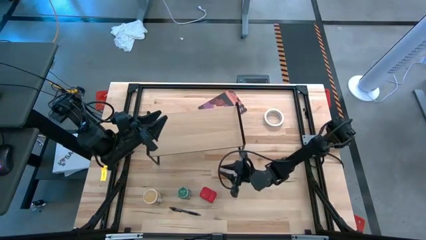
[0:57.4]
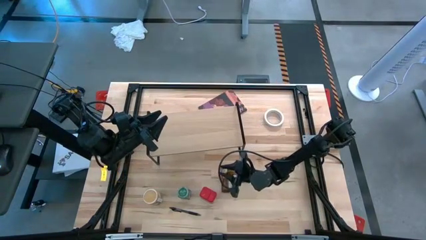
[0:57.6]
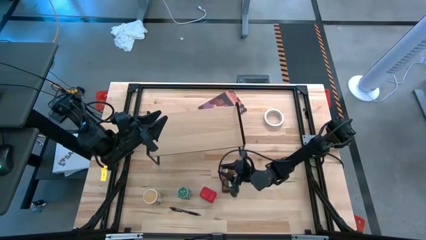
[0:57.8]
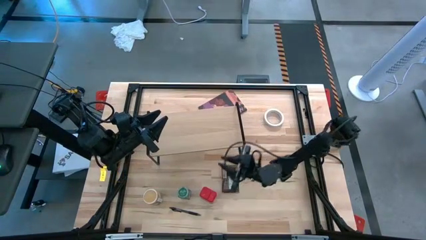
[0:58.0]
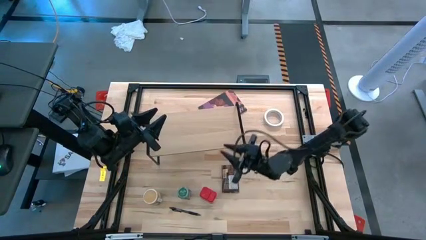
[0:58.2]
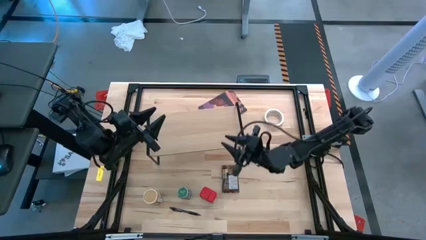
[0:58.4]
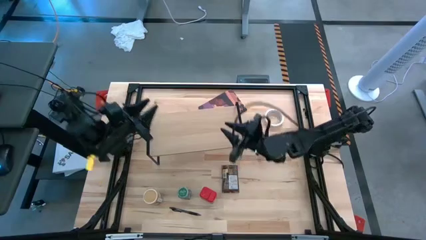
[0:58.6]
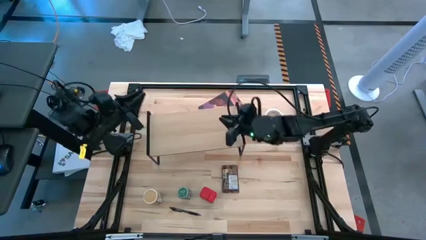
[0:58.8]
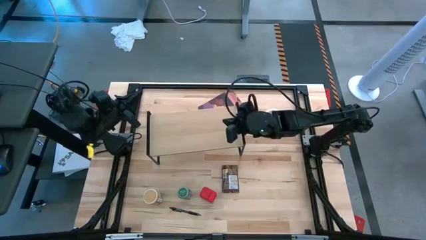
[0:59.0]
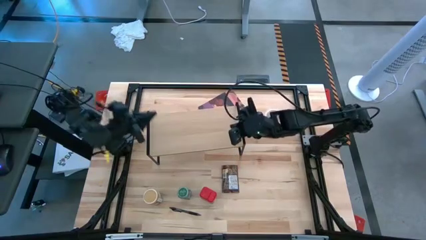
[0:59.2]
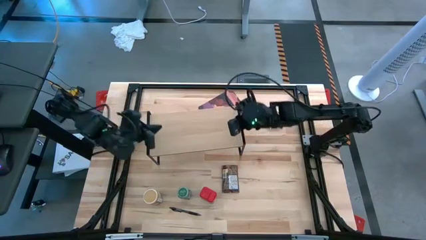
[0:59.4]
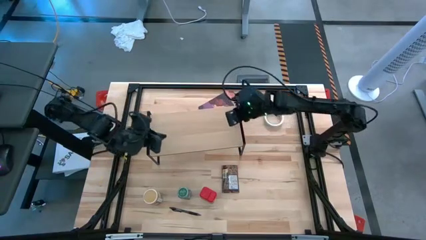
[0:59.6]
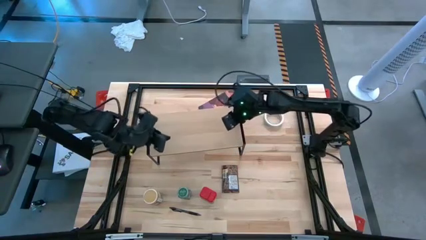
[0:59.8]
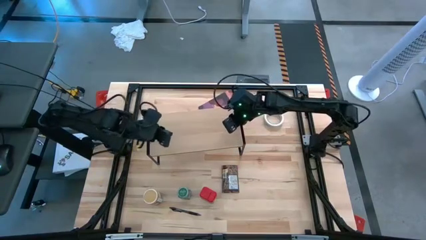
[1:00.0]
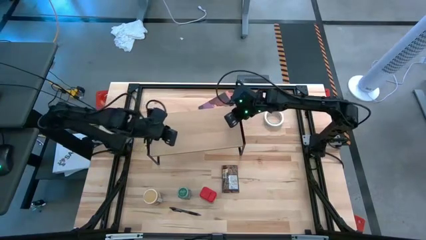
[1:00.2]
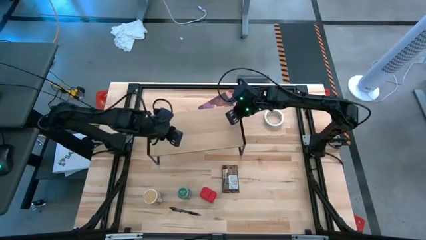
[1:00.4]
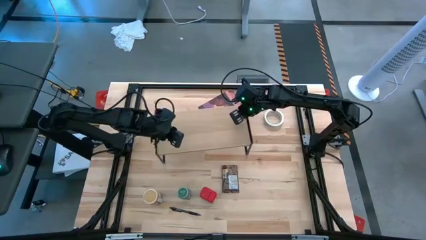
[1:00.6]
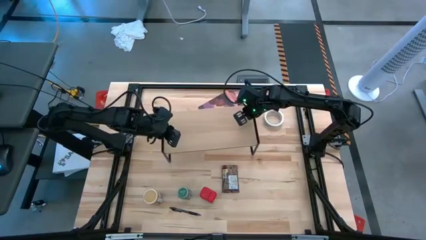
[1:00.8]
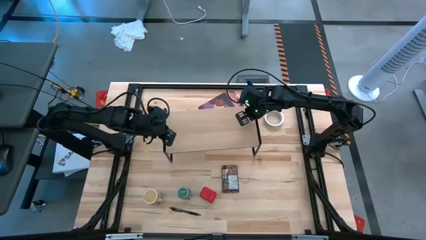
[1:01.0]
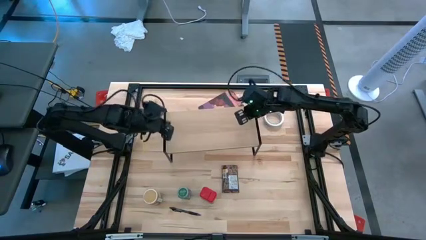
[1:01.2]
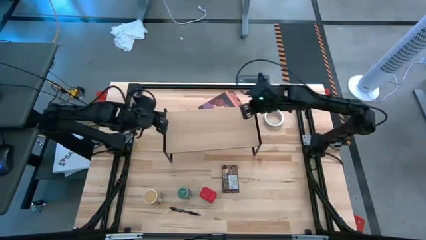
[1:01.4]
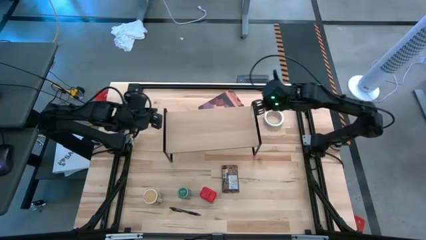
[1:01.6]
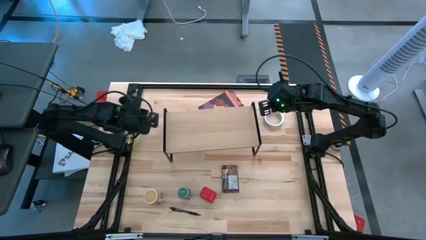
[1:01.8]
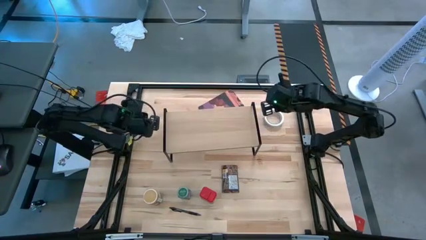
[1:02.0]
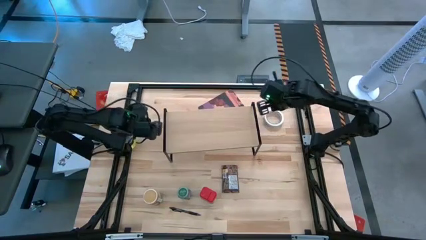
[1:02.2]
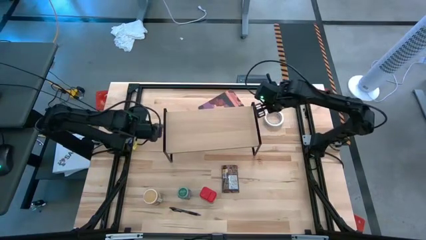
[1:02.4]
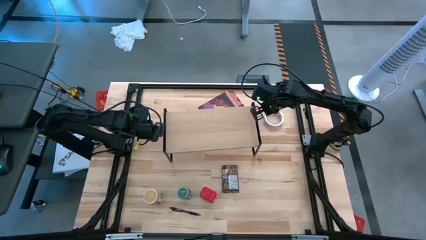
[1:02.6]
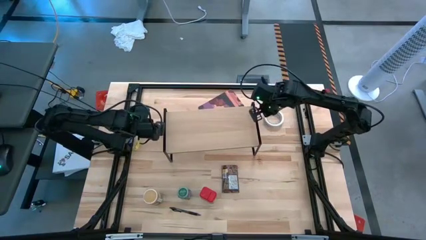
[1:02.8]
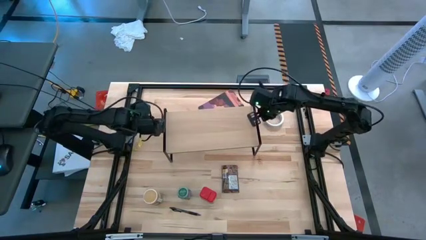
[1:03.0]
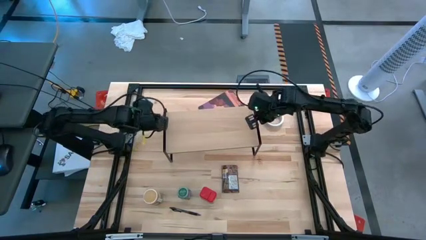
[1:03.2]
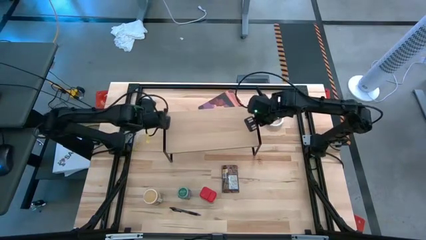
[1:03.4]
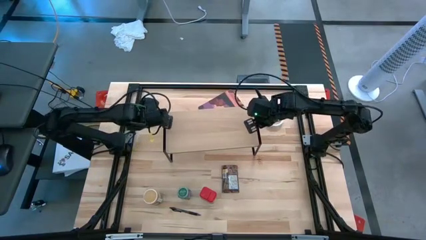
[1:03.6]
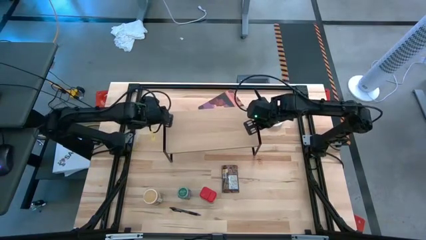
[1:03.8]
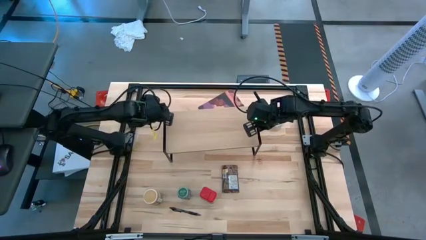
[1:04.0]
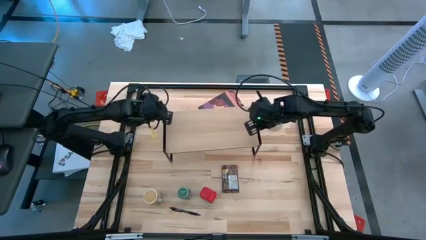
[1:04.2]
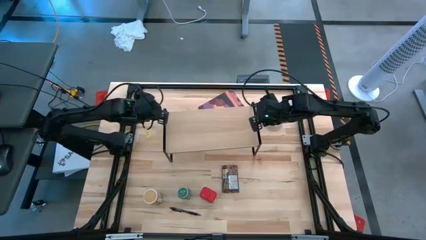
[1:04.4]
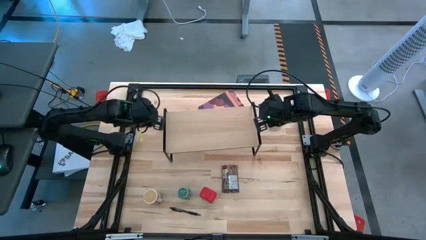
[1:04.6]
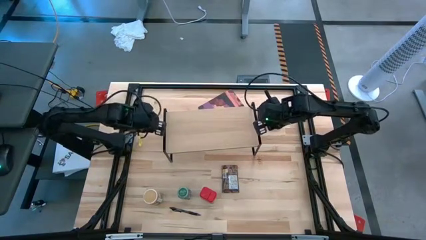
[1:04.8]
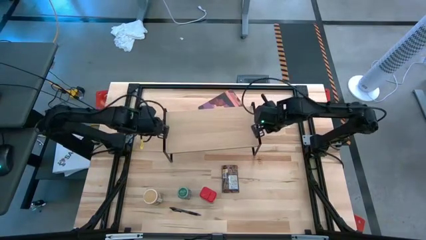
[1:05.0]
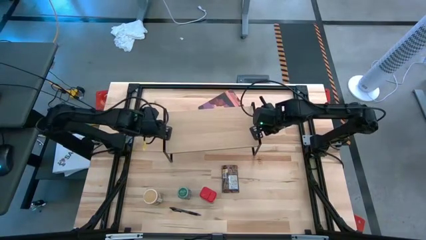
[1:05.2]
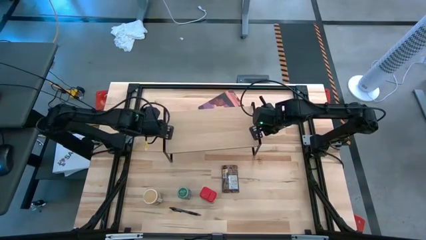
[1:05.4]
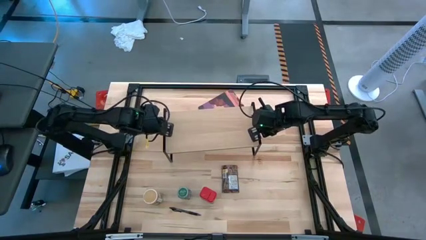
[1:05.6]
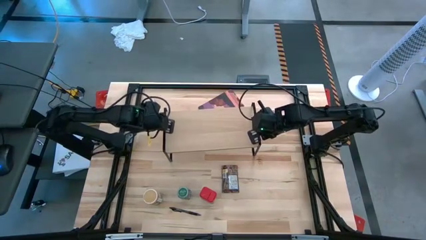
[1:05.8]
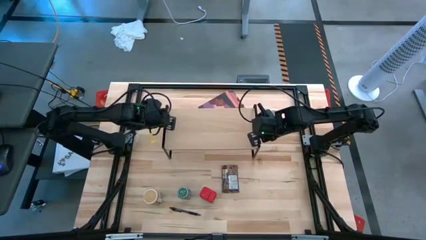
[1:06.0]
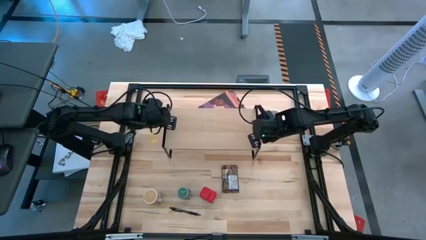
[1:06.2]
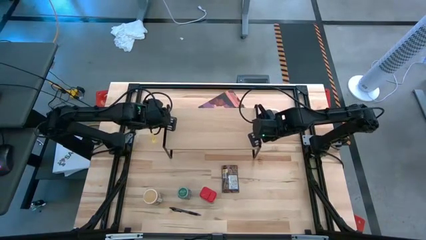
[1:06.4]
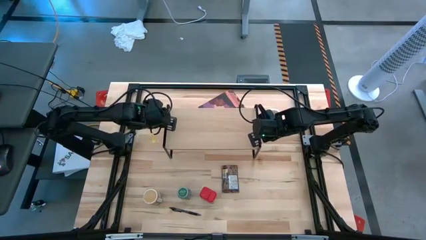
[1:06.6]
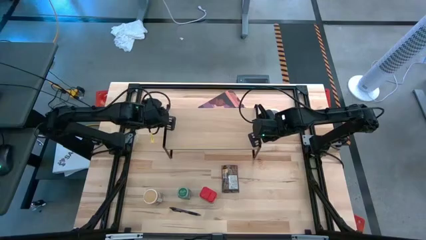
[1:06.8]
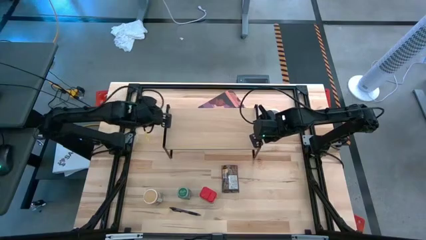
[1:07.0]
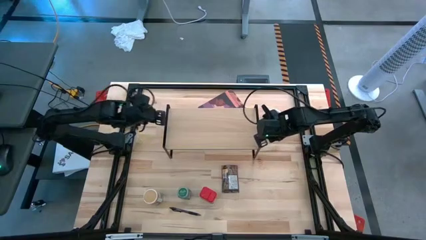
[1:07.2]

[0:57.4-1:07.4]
Task: Shelf spices
Adjust the shelf

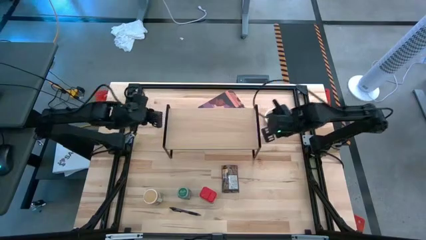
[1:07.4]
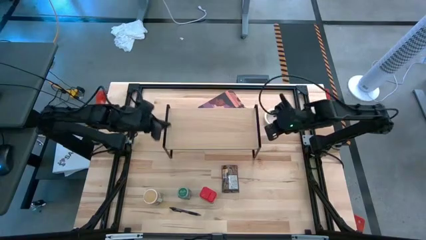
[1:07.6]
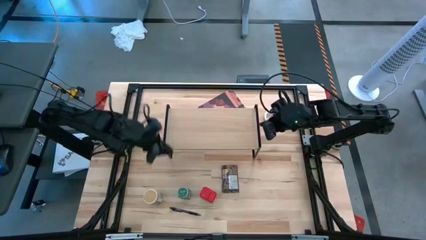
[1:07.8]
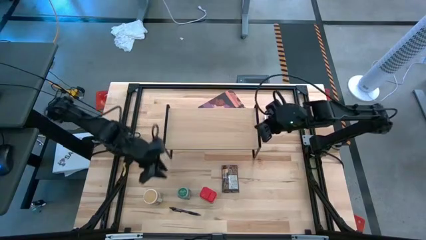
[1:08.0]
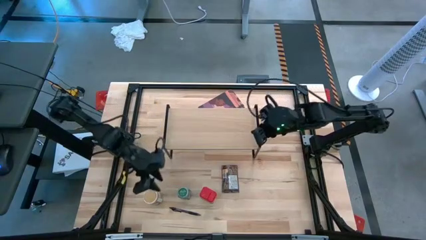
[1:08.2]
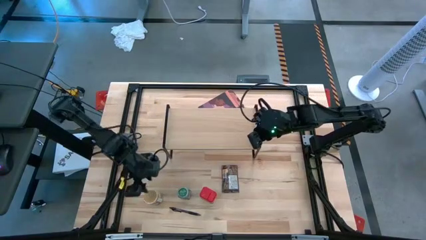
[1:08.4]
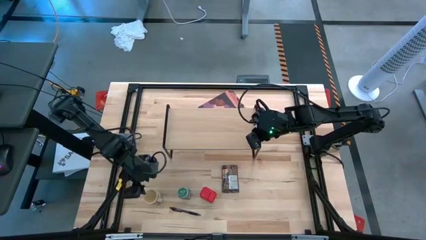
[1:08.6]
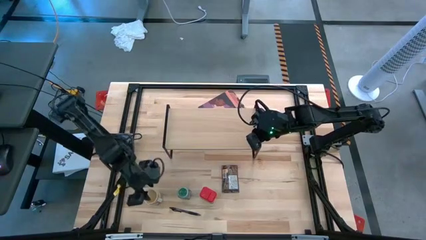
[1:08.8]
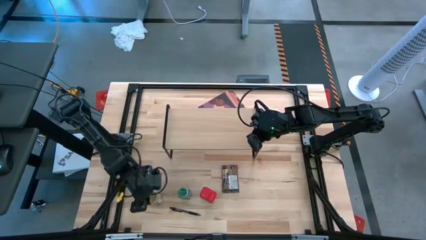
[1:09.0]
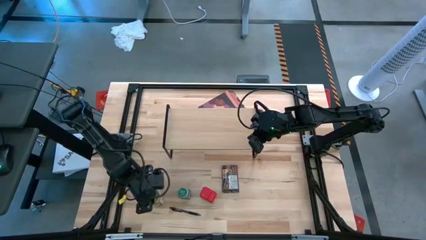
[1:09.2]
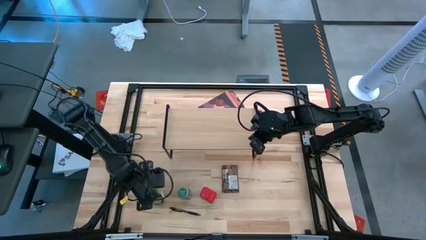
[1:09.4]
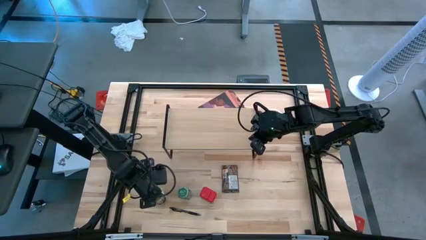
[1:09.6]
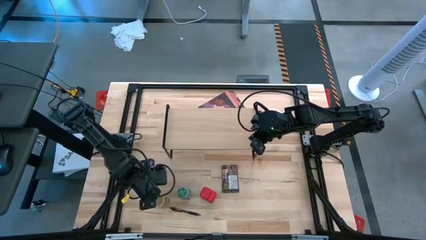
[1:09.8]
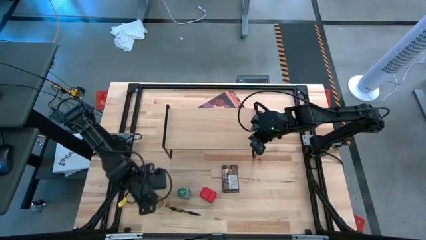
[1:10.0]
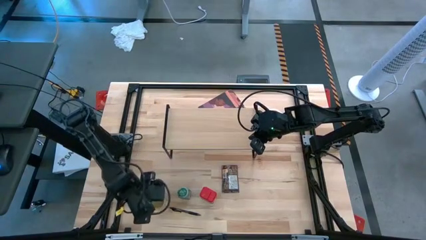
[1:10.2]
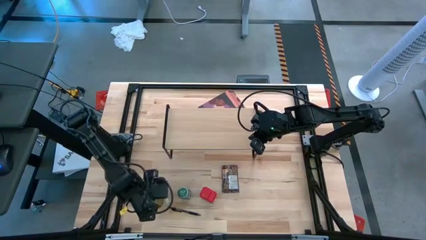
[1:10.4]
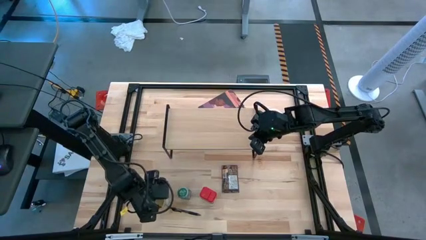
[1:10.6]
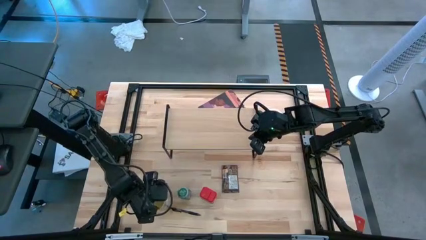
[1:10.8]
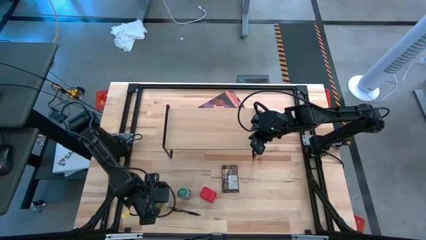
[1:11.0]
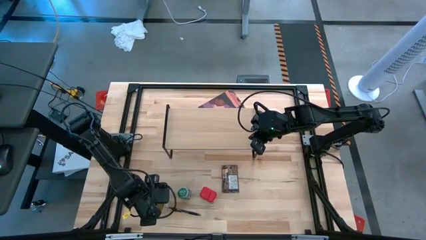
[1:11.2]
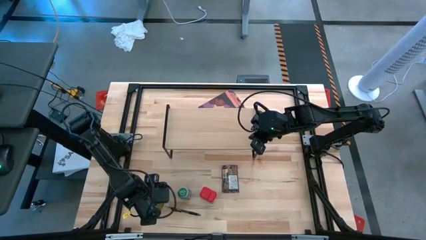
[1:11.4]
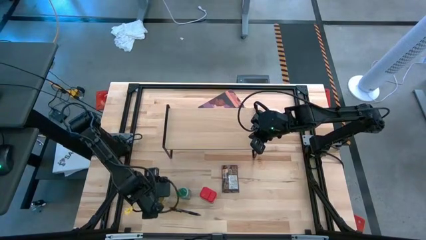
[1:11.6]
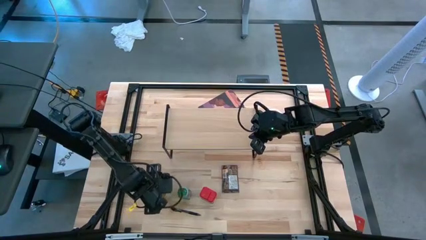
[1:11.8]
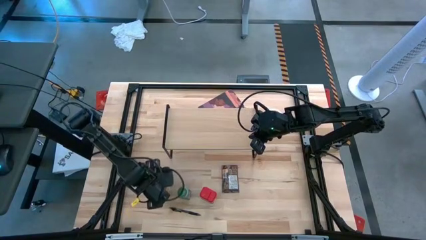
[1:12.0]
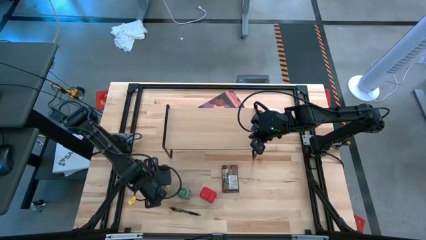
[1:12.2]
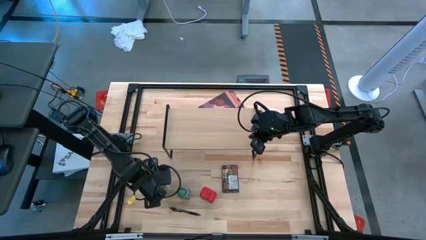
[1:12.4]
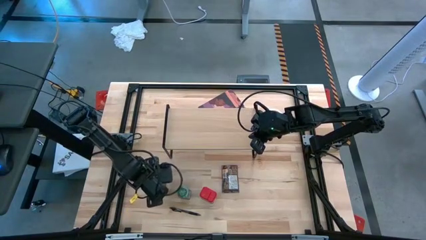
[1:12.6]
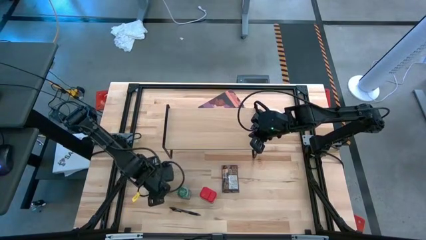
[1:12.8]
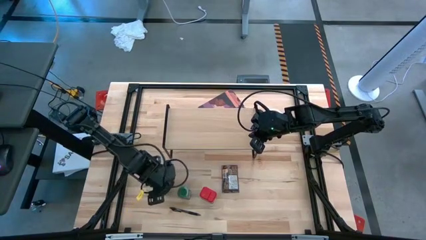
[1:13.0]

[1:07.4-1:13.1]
Put the brown seasoning bottle on the shelf

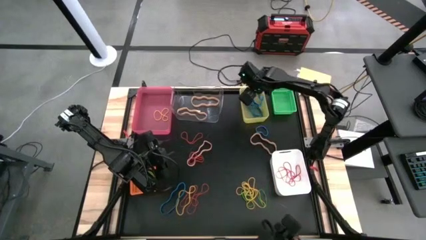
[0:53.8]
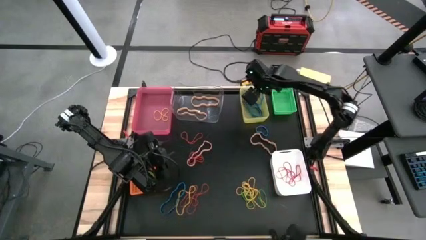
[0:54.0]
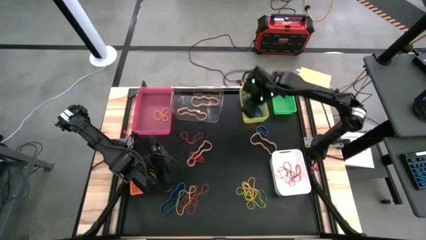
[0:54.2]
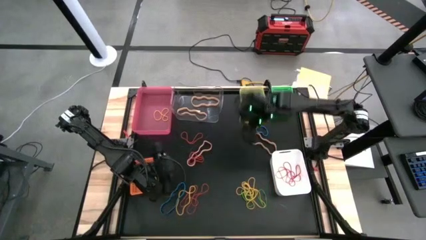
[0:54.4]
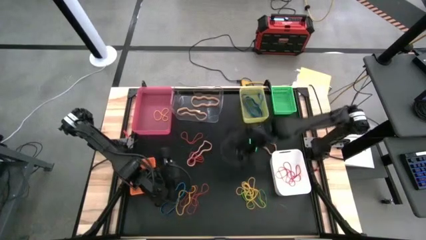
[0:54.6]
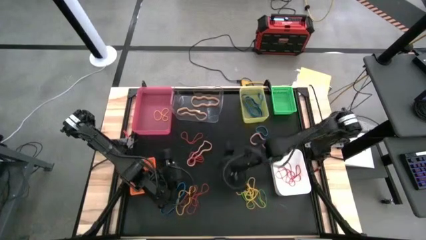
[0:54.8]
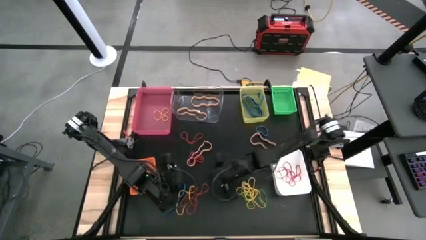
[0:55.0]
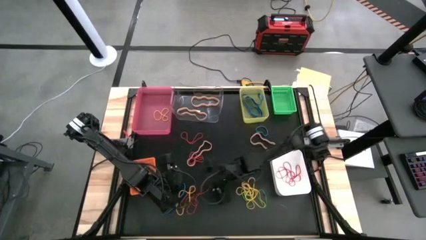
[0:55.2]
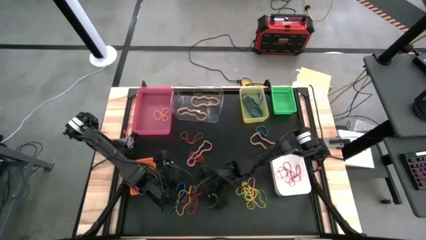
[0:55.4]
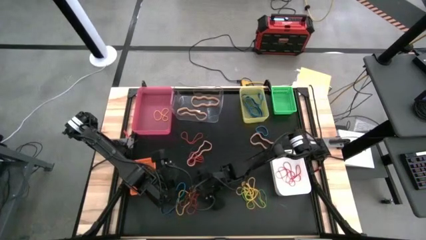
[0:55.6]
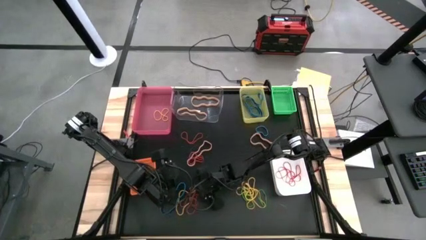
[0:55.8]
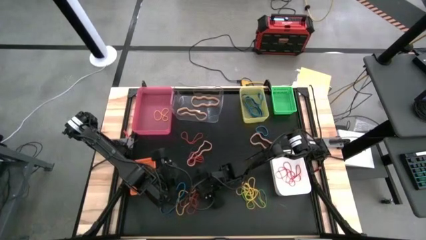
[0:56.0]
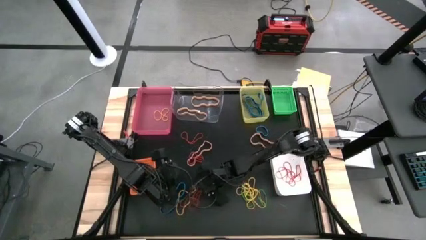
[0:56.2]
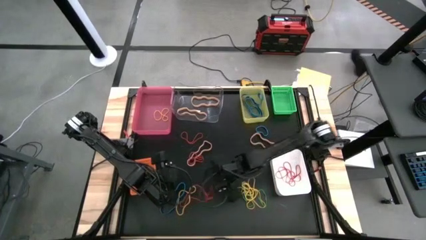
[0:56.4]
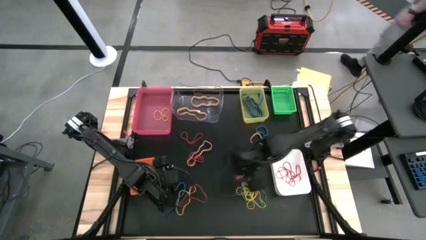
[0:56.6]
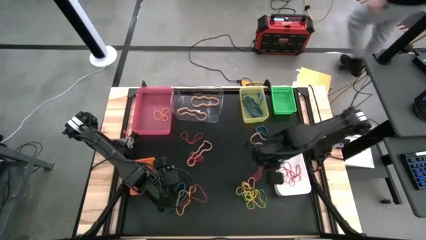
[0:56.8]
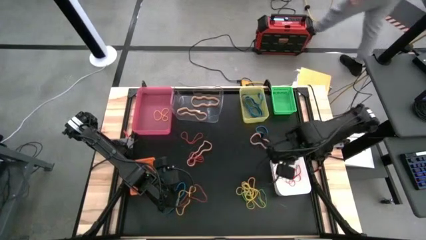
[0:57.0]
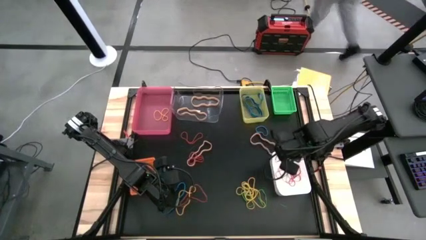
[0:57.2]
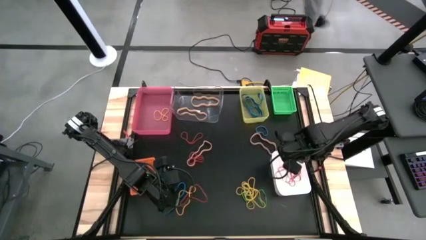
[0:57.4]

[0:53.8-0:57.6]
Task: Sort rubber bands into baskets
Put the red rubber band into the white bin
